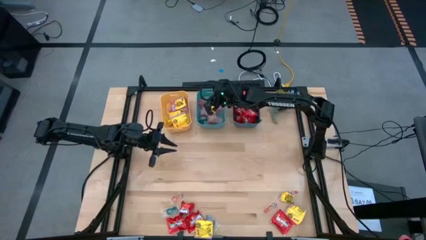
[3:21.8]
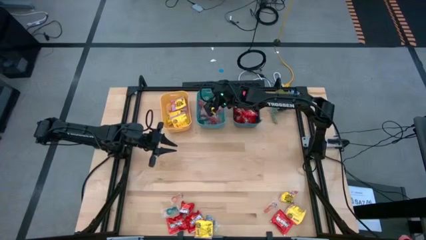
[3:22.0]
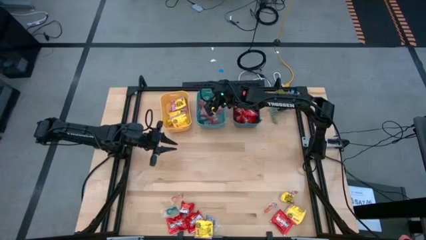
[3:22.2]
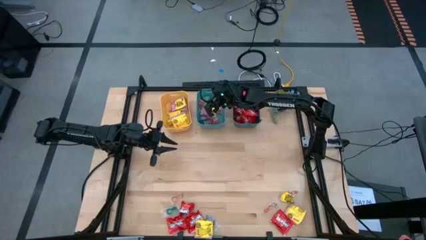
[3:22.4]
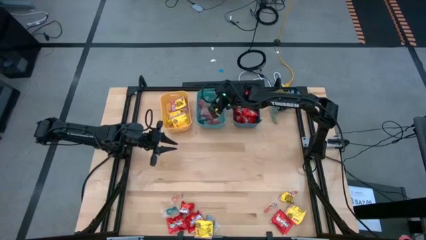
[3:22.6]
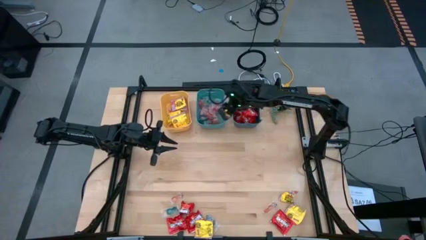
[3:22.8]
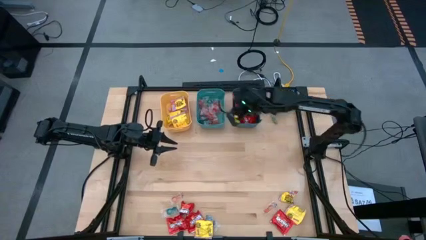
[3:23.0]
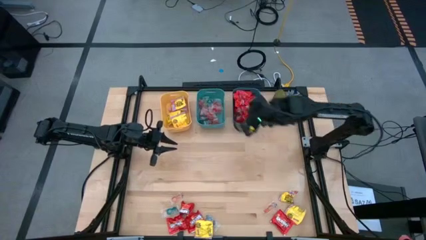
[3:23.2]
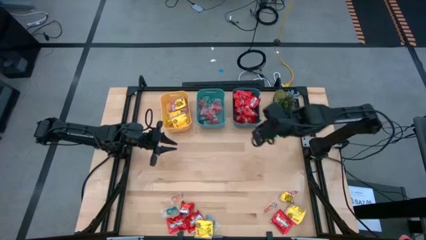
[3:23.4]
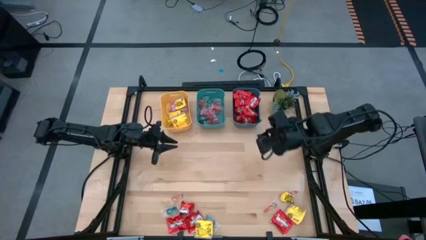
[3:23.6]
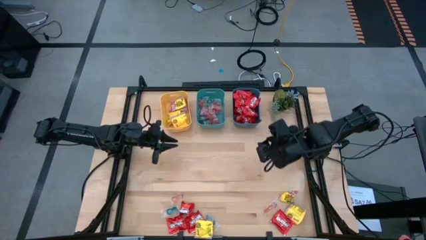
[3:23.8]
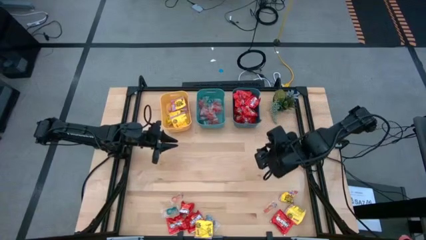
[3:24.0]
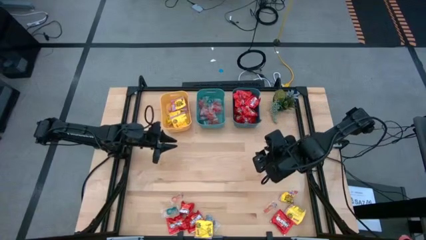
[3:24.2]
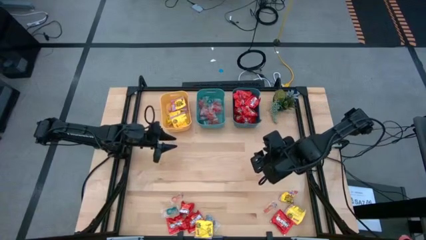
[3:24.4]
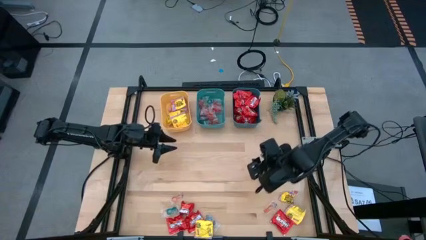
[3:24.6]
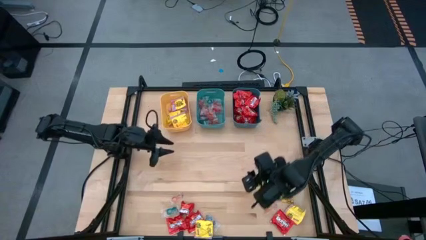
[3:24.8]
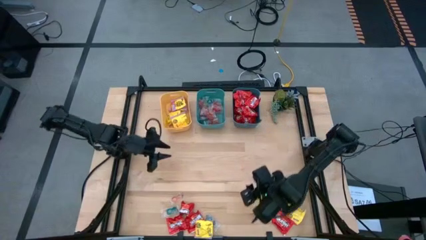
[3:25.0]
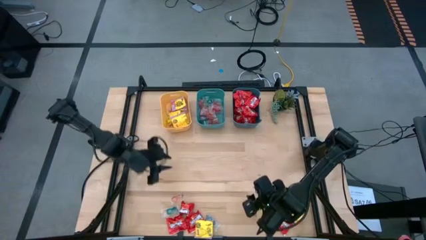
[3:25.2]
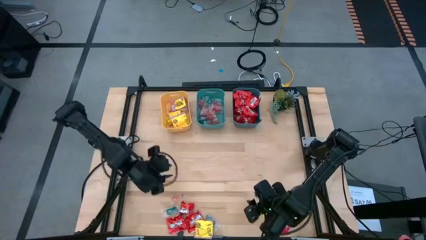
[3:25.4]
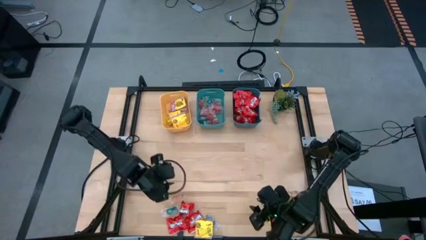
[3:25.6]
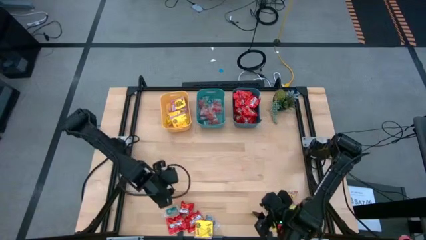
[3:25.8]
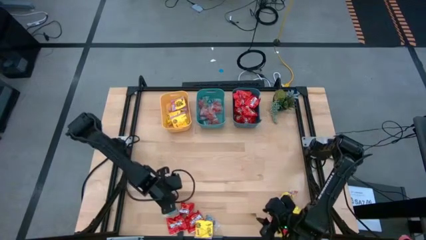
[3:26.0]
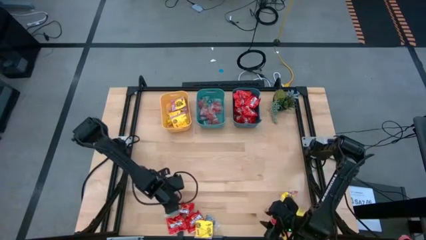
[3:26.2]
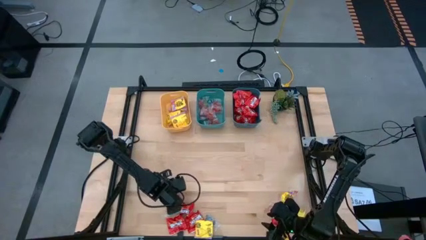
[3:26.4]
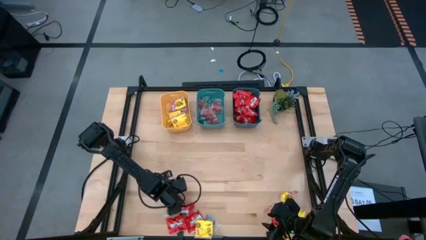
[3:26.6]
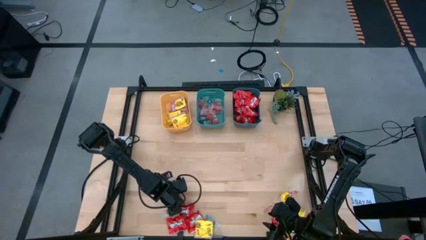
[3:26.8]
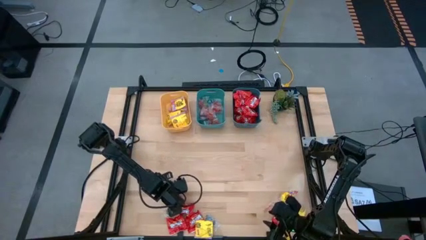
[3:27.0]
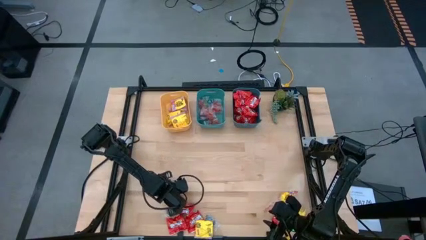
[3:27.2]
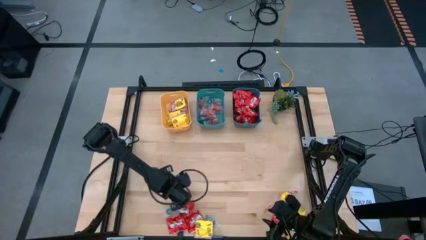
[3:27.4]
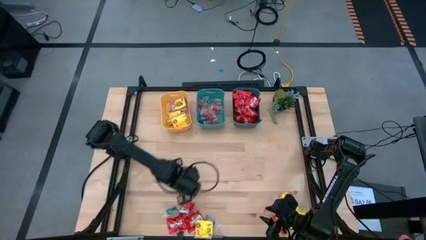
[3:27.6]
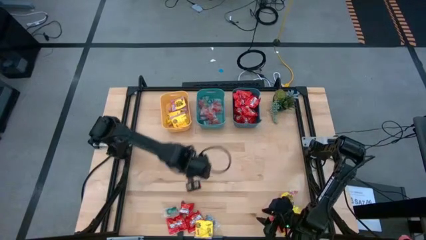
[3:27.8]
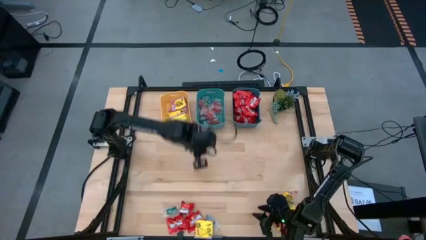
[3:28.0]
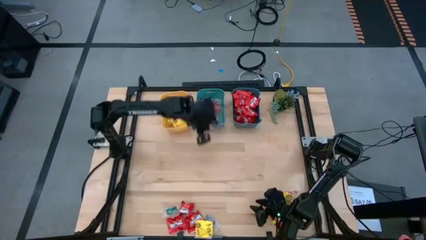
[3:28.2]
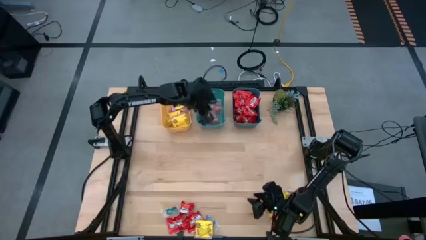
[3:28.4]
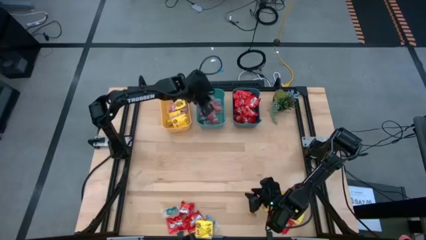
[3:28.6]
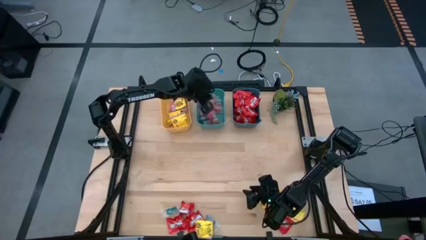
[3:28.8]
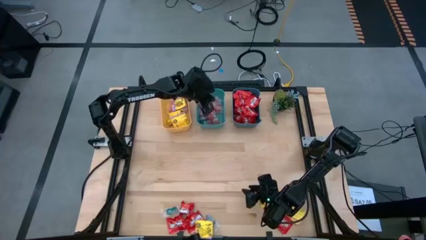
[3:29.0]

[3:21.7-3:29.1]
Task: Sort candy
Put the light orange gummy candy into the green bin

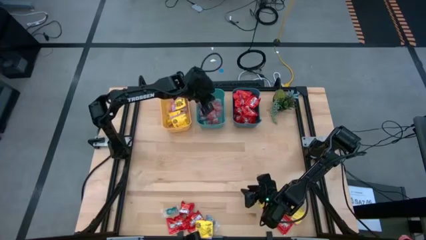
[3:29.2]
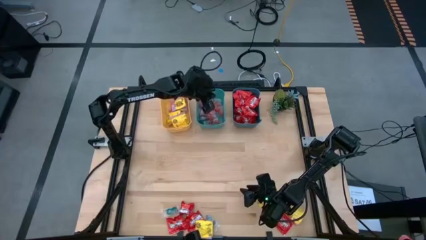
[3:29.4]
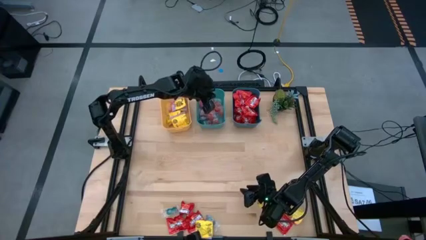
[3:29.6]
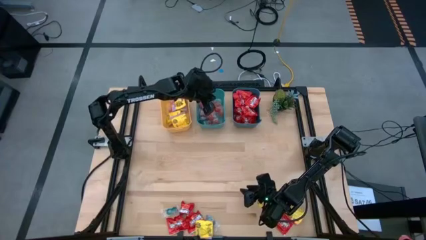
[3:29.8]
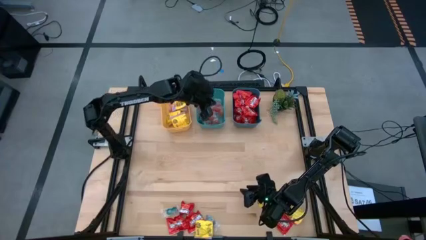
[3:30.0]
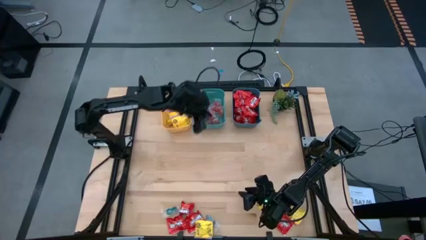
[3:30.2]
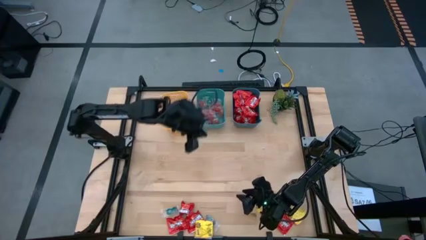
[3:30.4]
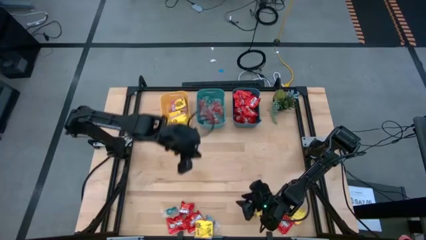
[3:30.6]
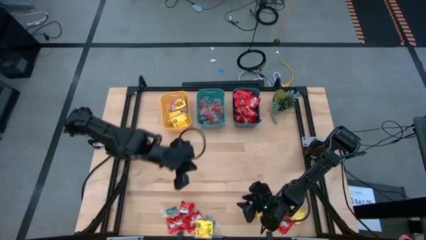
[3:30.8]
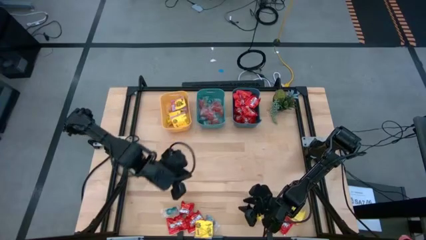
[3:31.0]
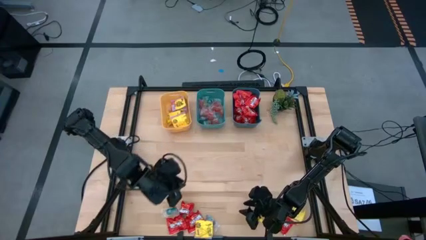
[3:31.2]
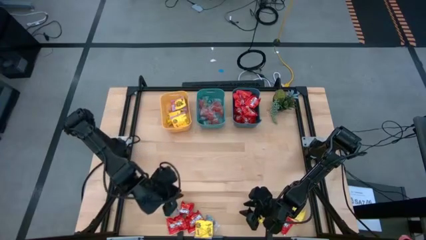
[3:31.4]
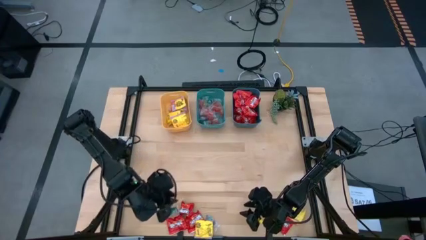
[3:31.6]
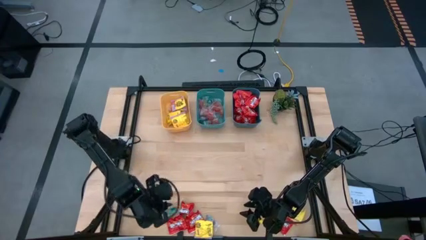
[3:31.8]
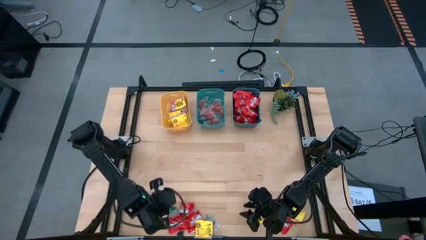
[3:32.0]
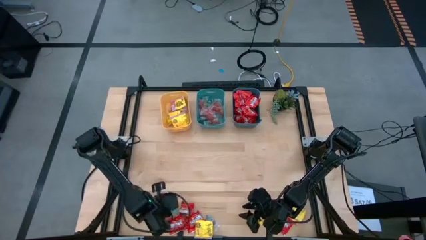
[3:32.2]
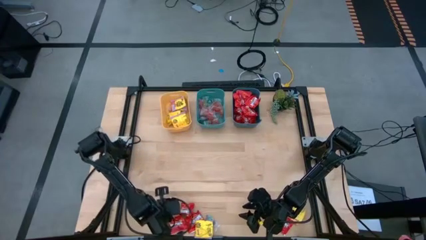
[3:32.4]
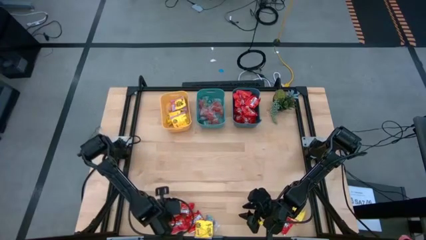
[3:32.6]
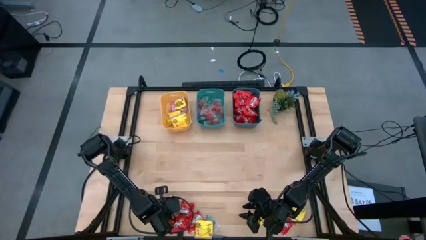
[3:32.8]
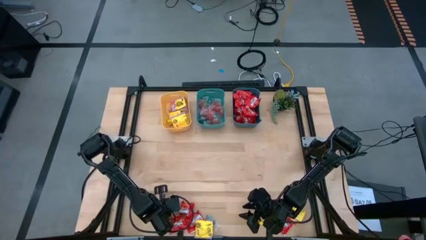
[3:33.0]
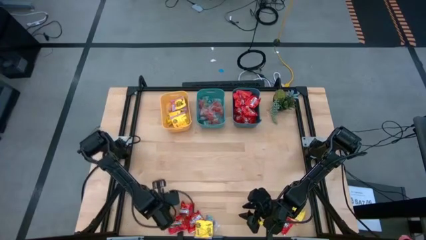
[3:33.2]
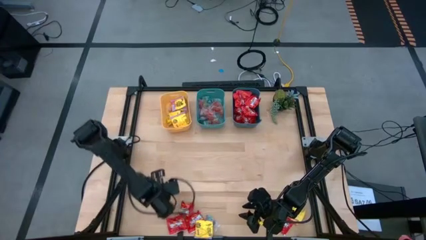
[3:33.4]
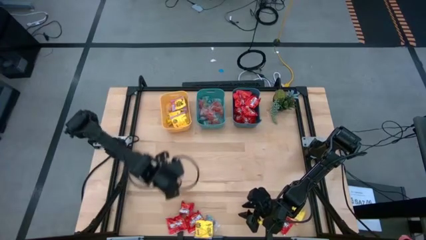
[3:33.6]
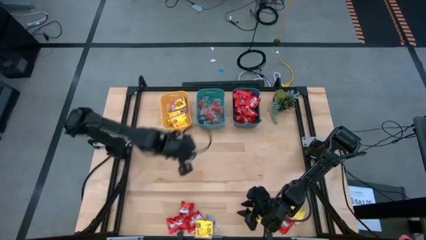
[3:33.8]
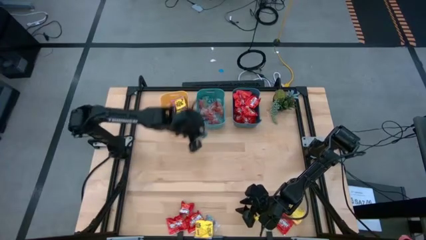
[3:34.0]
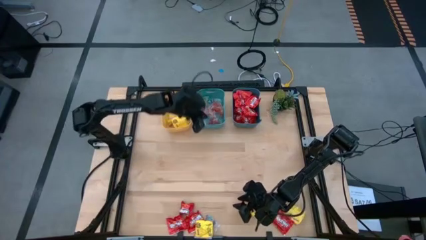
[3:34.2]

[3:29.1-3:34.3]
Put the blue gummy candy into the green bin

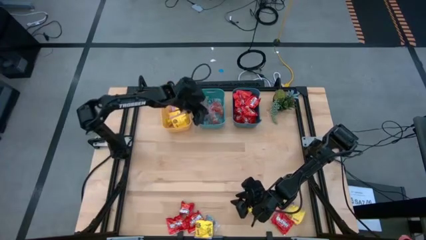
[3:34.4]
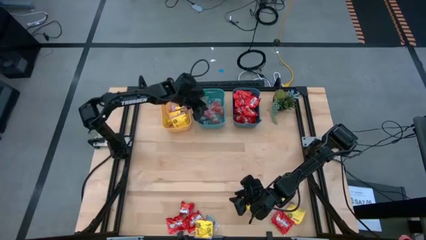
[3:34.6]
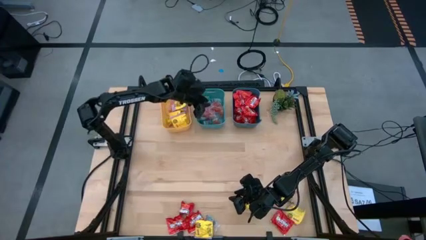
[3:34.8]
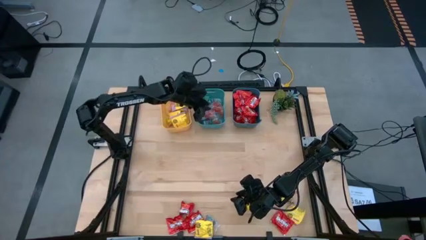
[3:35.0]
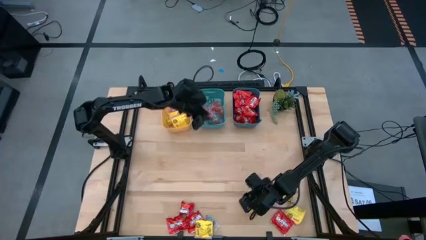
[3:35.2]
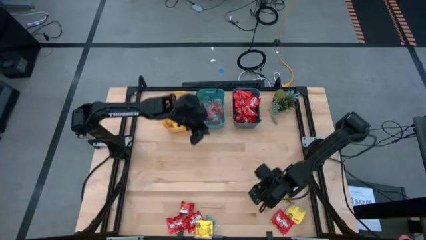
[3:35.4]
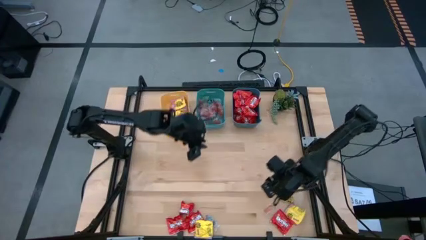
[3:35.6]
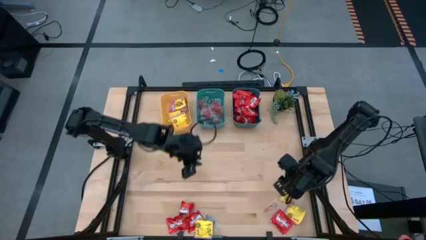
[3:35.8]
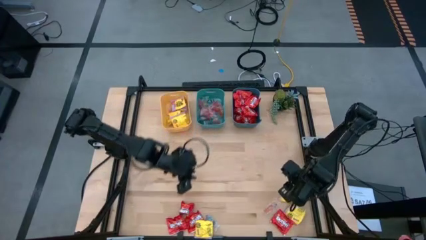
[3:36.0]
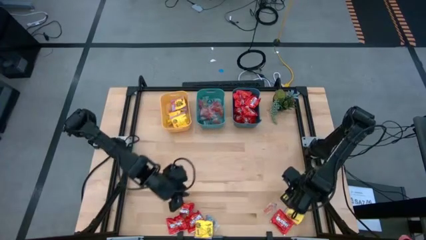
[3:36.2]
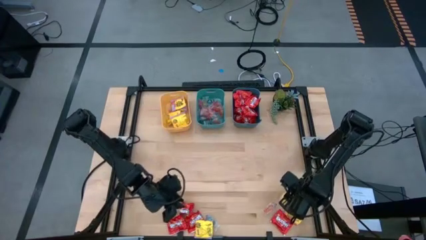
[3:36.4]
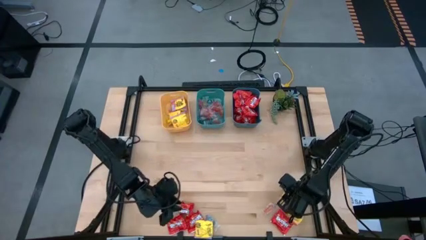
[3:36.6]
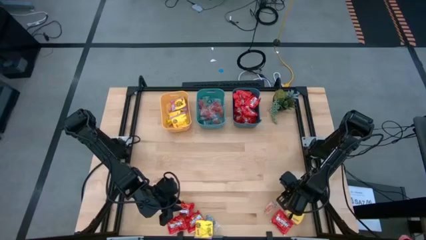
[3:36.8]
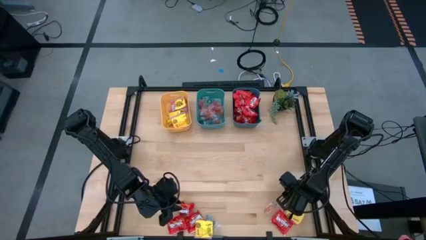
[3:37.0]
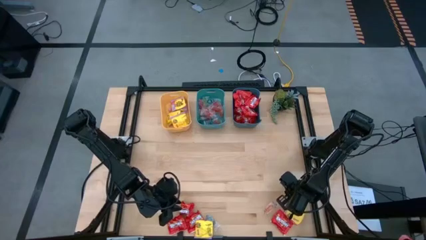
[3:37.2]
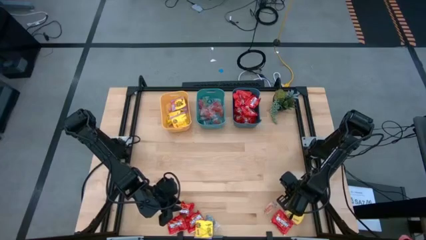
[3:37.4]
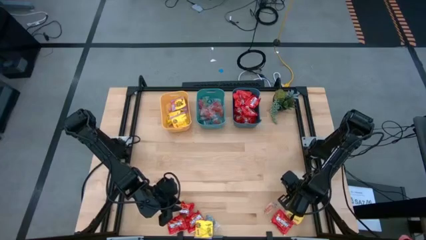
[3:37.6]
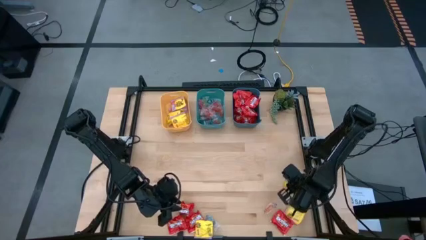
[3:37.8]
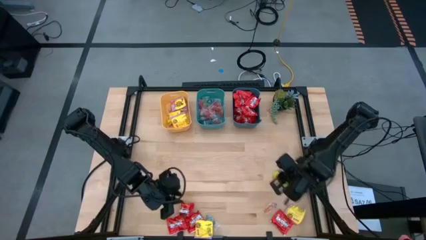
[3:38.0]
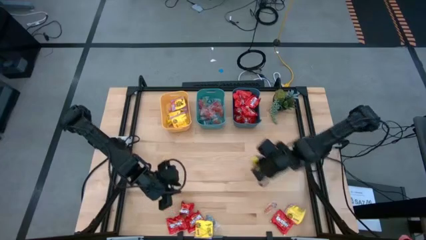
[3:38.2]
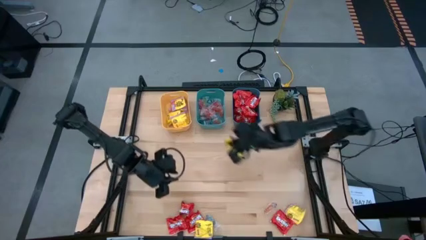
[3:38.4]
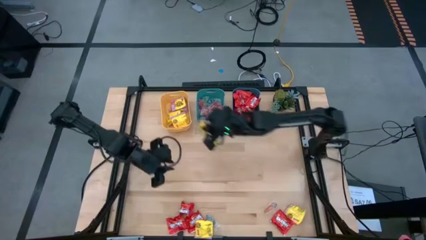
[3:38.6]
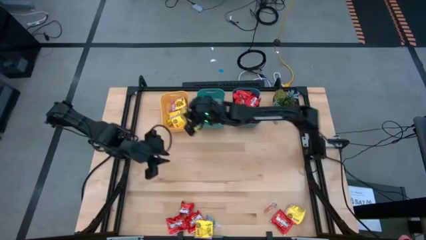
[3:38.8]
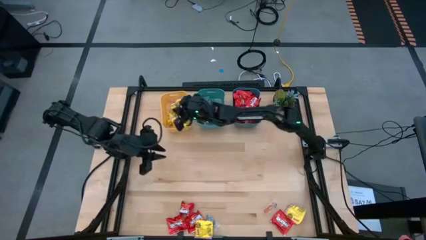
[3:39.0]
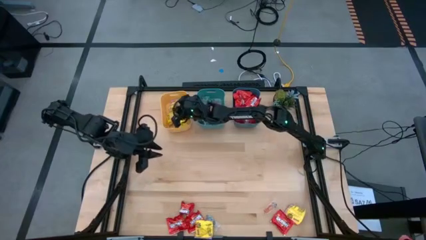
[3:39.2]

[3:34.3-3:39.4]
Put the yellow candy into the yellow bin
